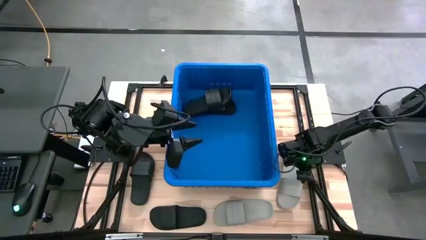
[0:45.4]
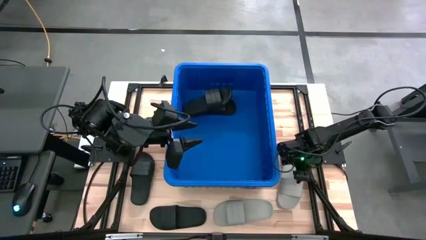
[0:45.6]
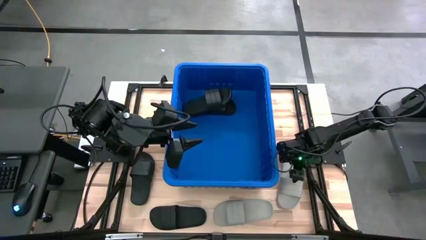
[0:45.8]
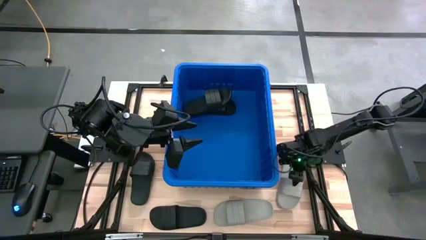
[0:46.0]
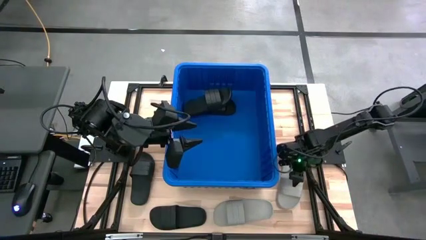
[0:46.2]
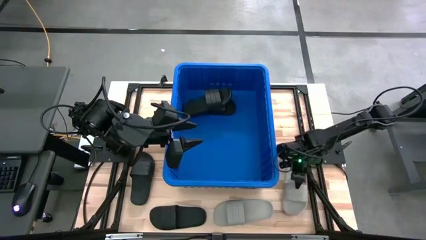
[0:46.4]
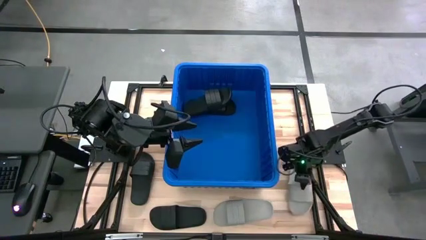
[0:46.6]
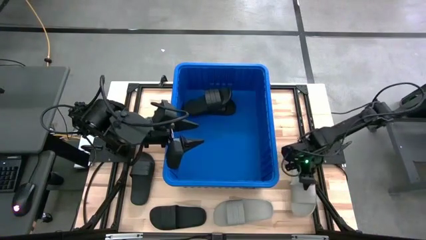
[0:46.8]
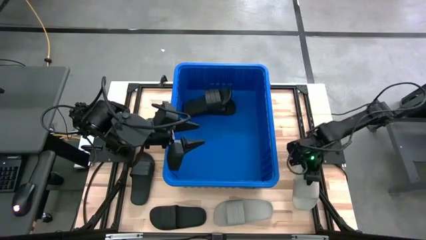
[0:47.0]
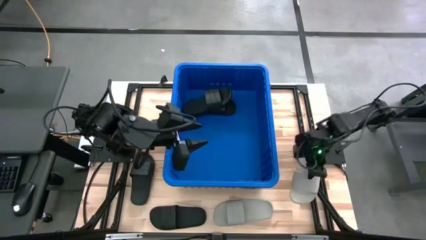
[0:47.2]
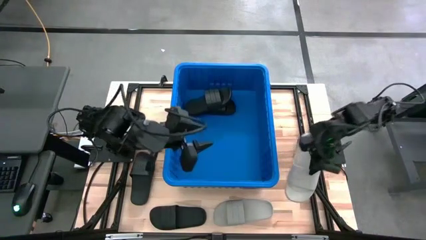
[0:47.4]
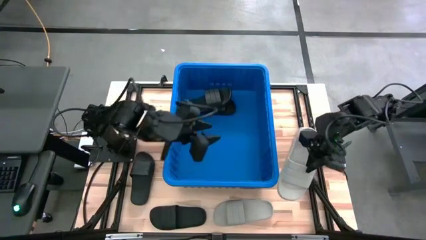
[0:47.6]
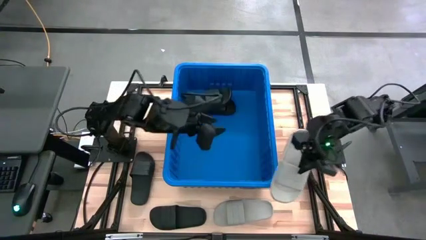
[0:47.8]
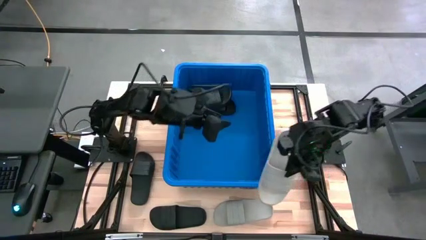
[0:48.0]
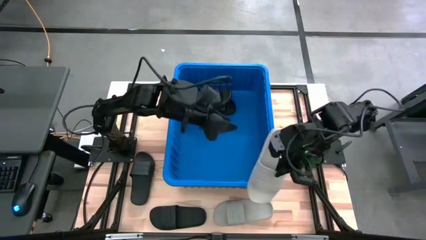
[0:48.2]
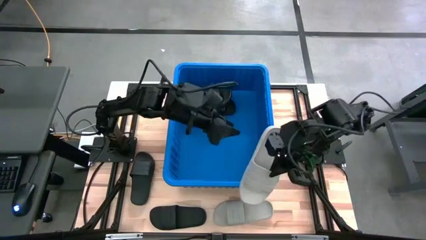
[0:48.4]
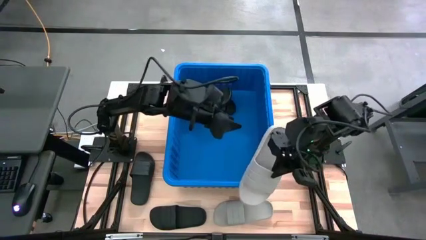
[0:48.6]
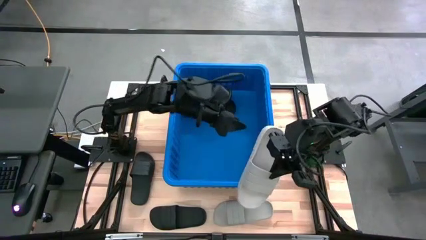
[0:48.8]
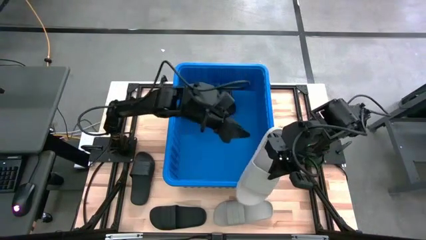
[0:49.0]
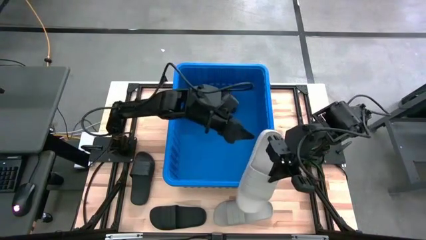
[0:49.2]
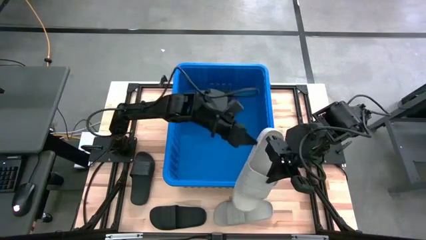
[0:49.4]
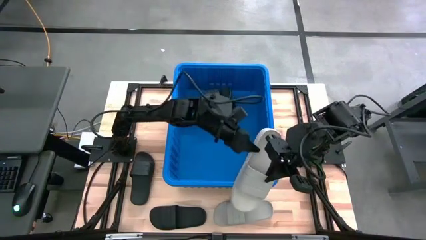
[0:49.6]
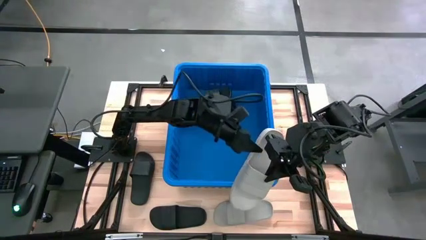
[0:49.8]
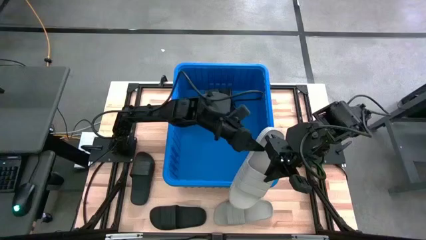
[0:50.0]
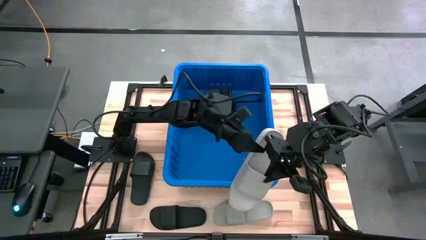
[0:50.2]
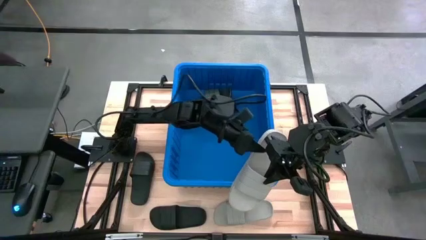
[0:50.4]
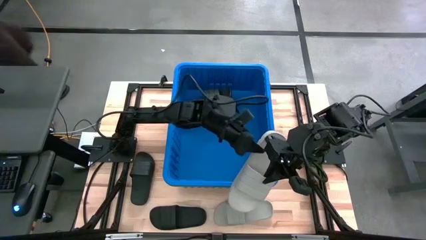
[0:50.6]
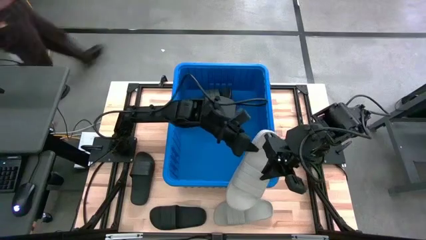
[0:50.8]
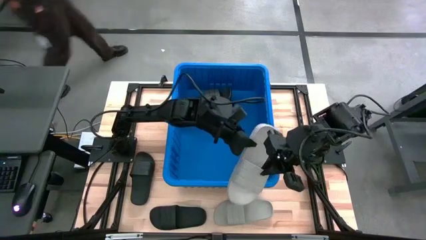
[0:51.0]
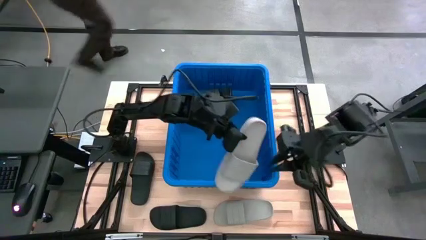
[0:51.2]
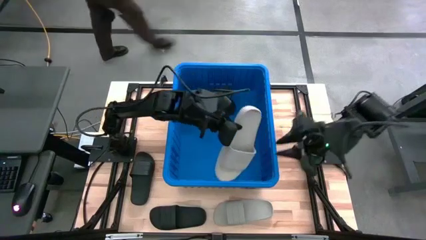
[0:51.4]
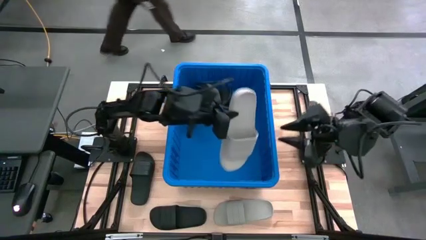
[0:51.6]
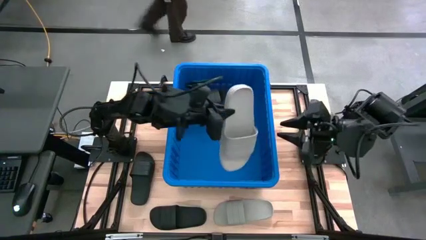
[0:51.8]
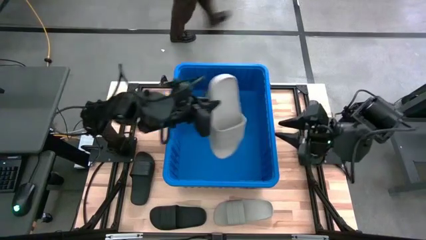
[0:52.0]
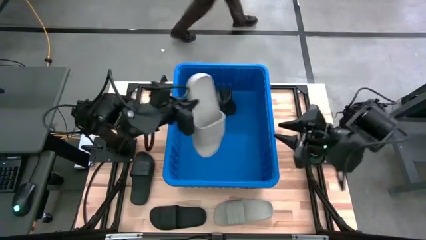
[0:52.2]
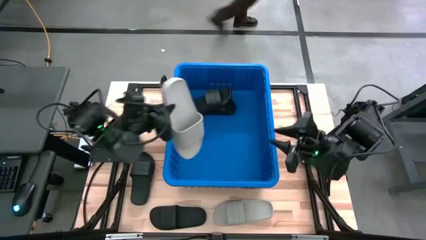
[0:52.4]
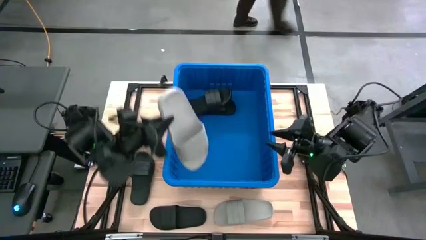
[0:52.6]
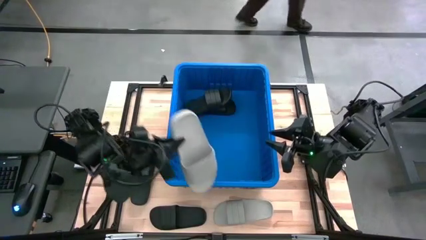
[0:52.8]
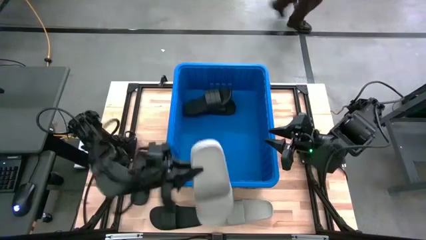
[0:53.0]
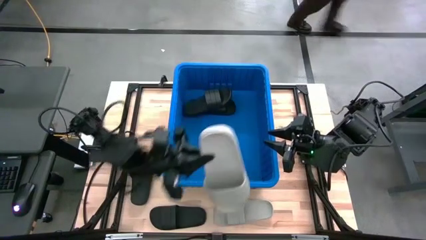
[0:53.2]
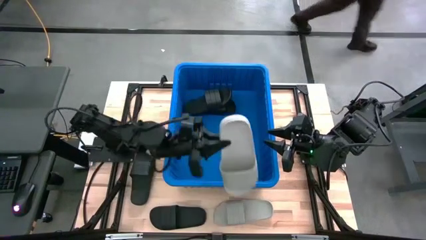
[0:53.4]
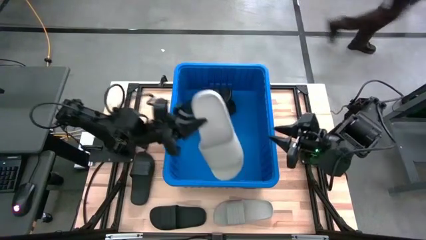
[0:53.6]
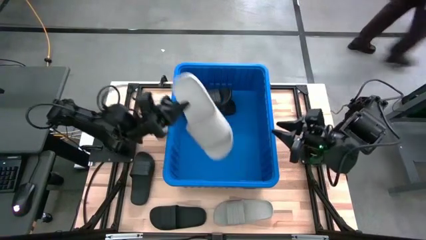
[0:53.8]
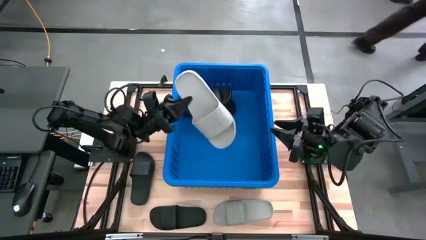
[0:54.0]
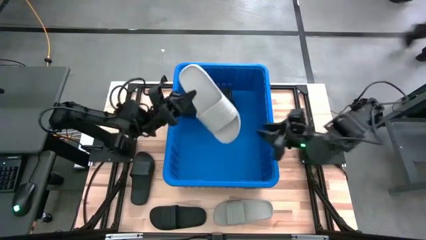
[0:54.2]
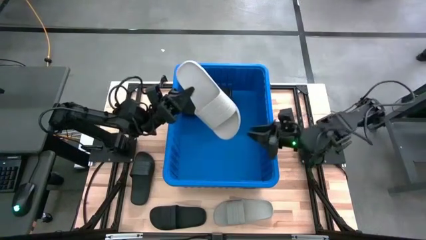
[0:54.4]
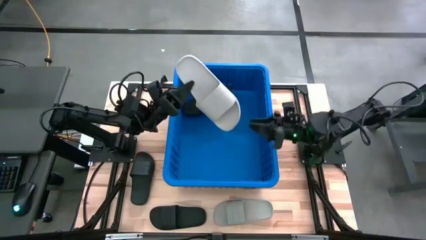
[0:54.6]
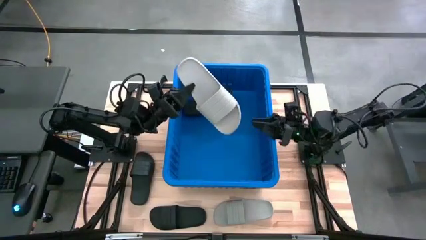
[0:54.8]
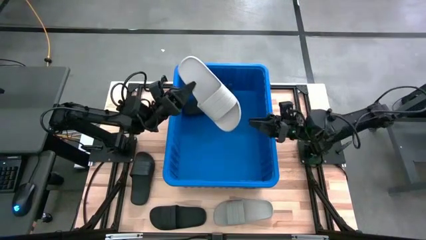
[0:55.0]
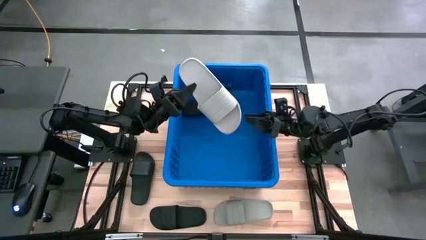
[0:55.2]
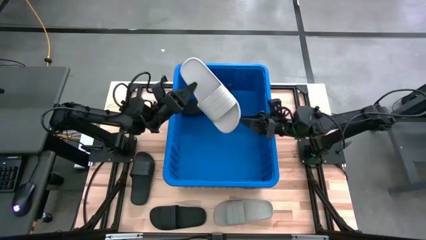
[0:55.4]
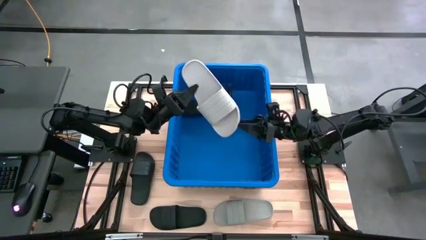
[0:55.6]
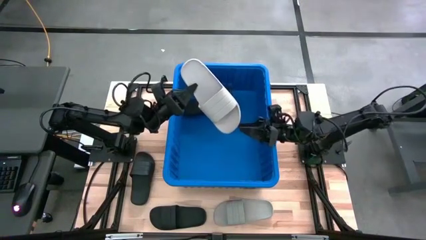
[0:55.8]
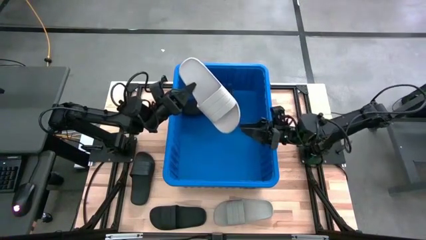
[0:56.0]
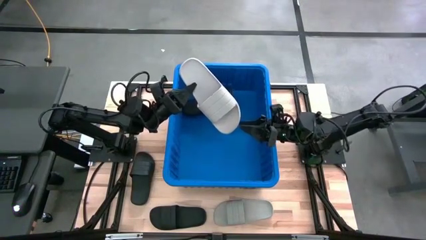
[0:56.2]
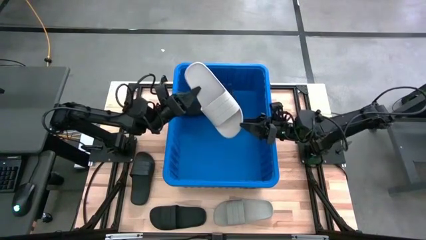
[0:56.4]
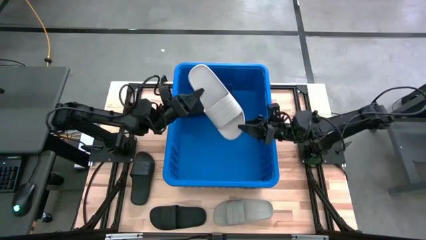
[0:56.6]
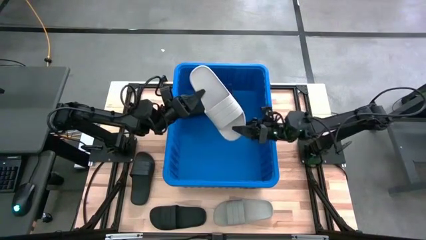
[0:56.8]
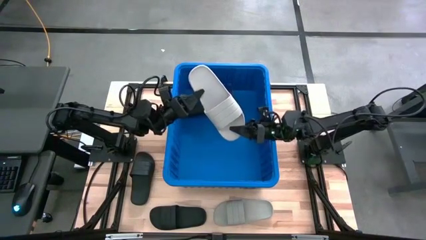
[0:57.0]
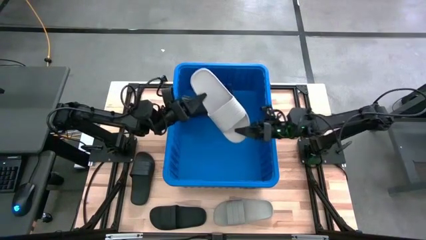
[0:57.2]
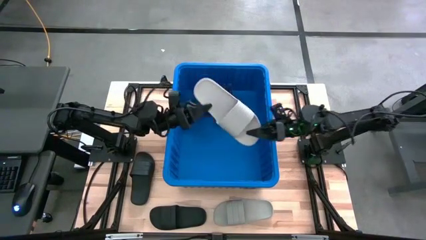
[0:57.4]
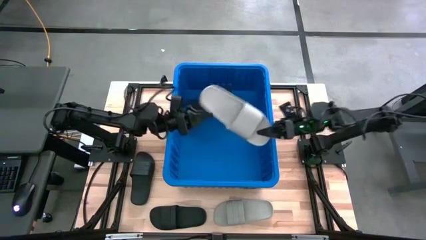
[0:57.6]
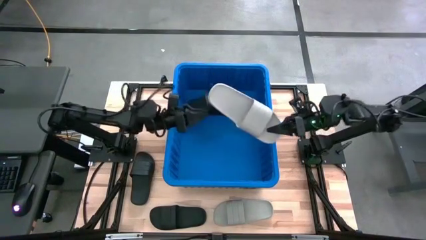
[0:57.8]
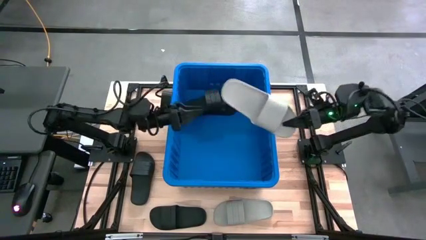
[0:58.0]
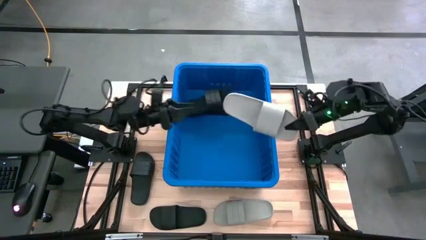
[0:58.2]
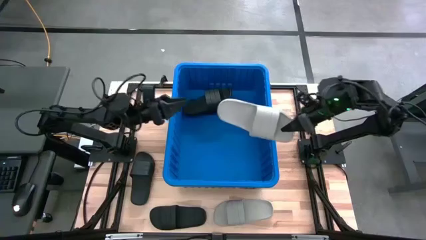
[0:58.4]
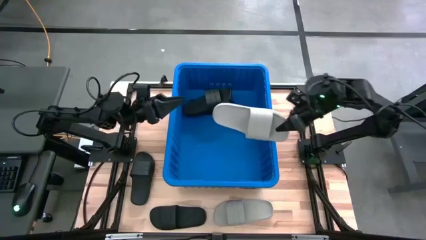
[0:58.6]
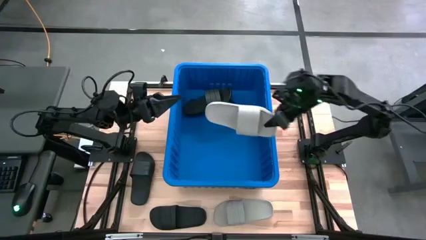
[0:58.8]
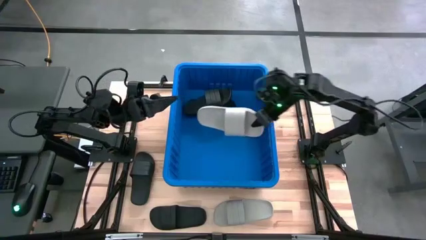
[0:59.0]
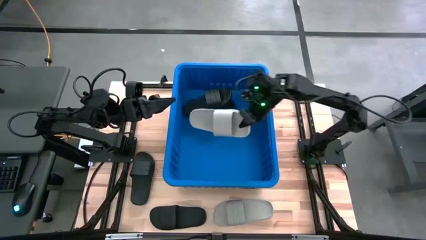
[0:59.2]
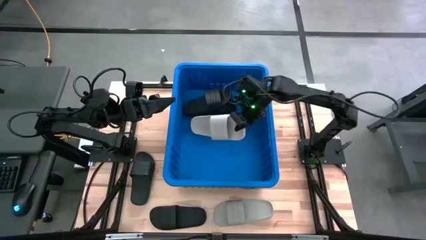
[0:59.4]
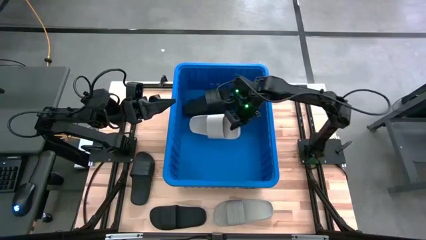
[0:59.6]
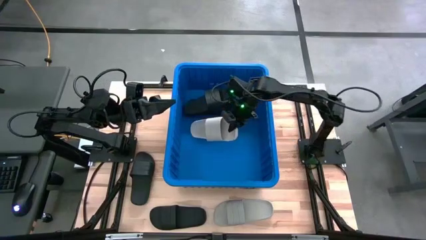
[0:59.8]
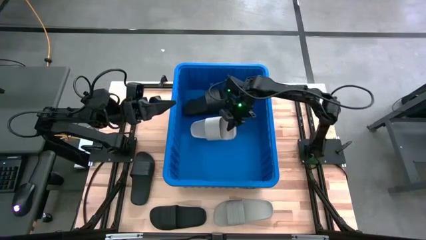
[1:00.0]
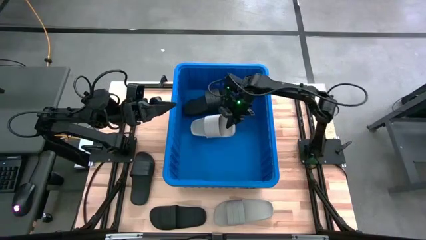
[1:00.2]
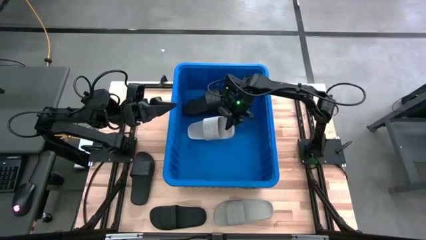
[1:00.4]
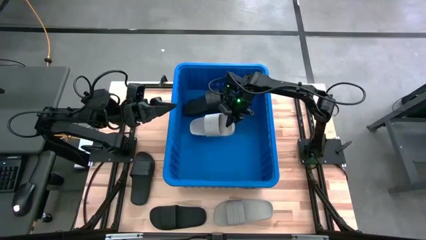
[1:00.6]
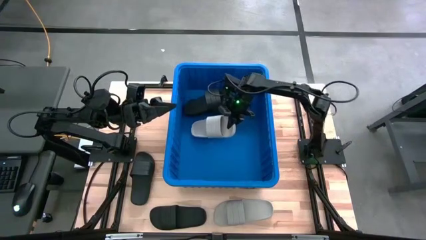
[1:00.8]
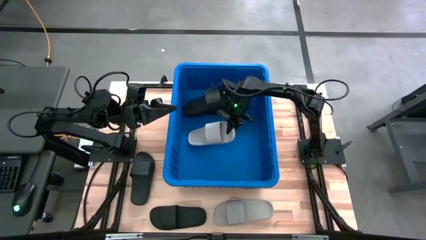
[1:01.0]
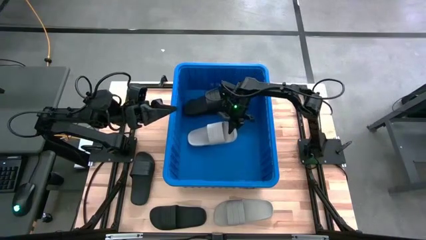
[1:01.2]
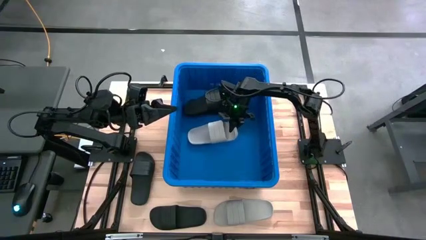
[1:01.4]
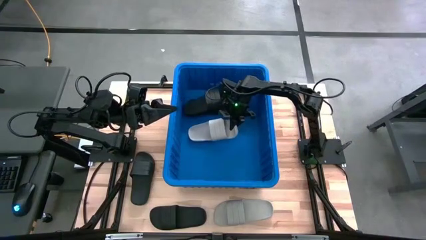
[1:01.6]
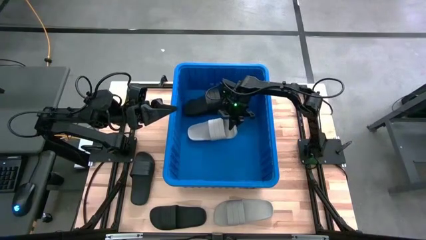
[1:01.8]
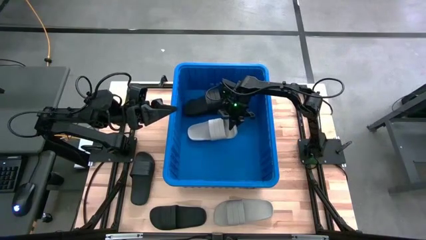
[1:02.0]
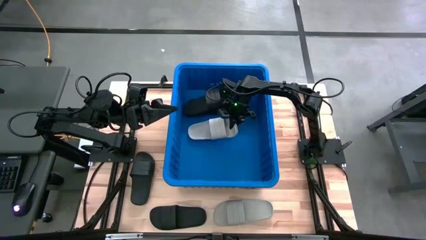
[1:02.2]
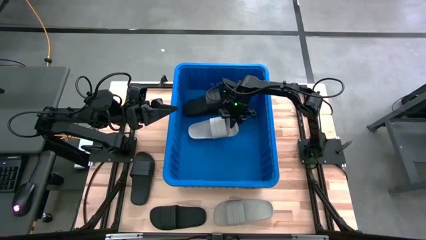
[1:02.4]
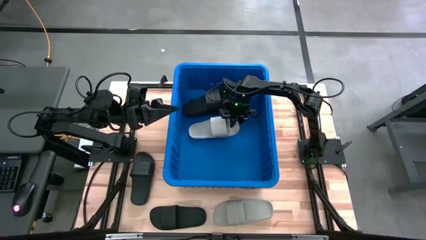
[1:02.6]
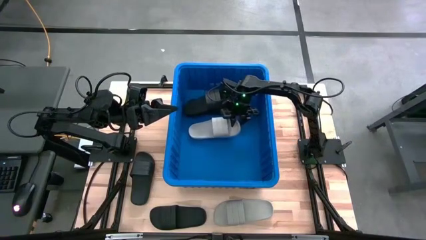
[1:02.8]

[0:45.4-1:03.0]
Task: Pick and place slides into bin
Put the right white slipper into the bin
